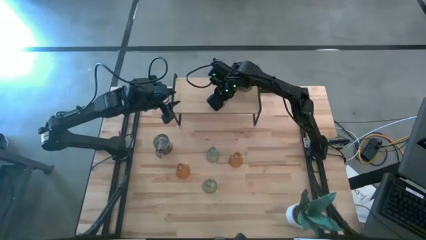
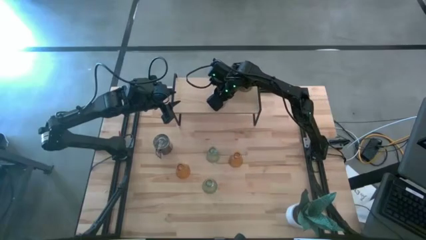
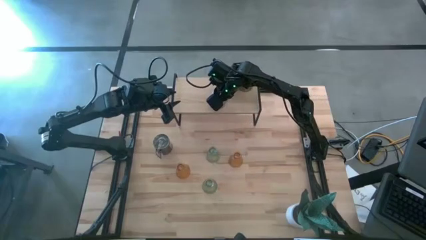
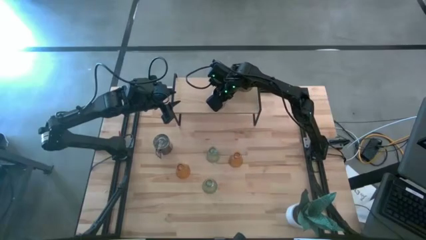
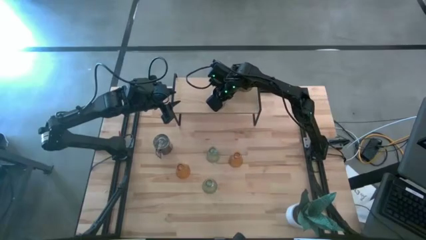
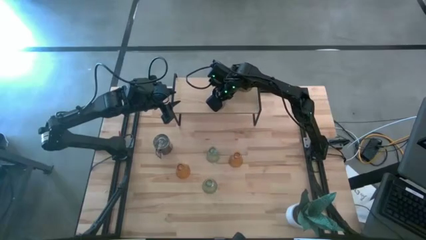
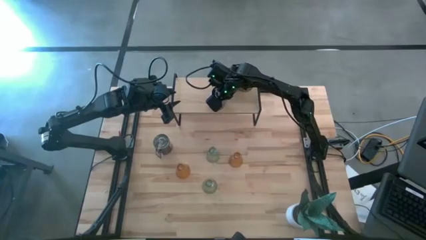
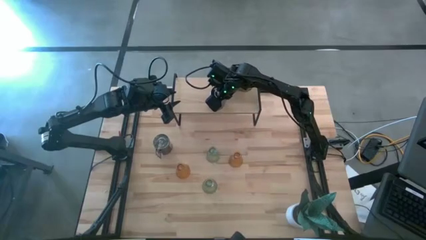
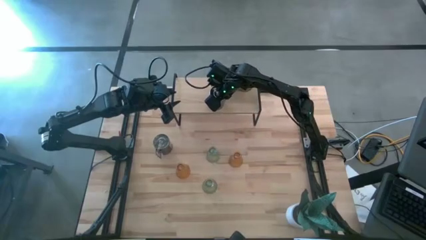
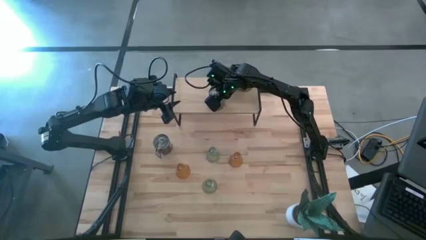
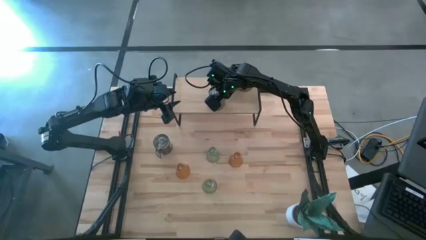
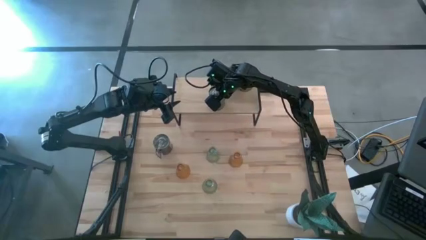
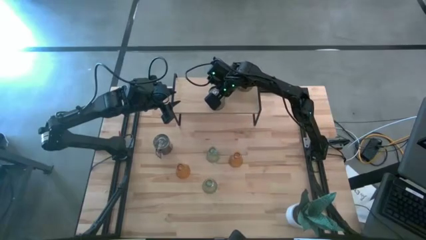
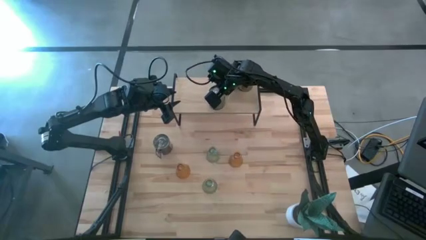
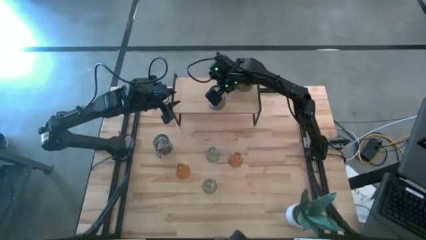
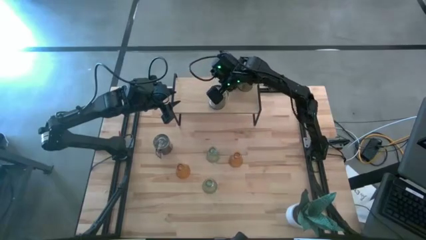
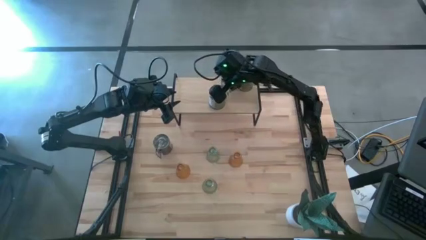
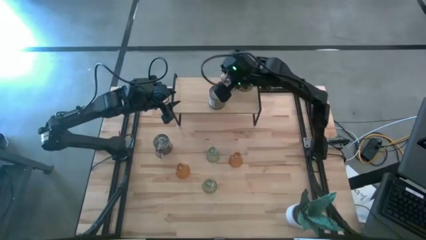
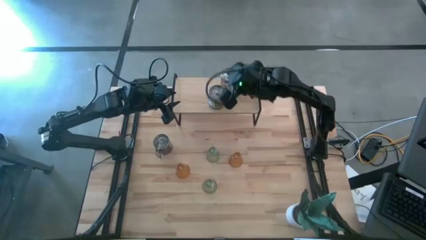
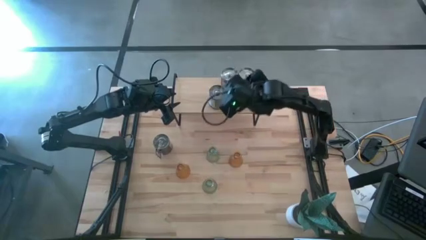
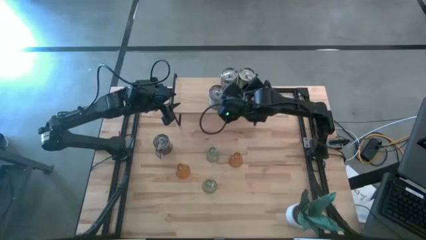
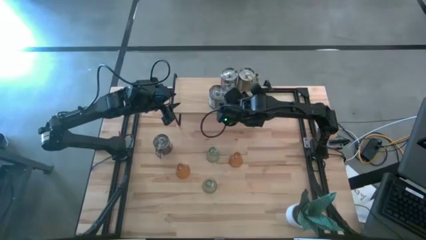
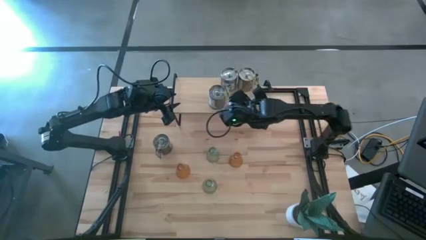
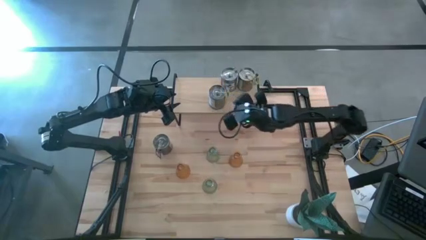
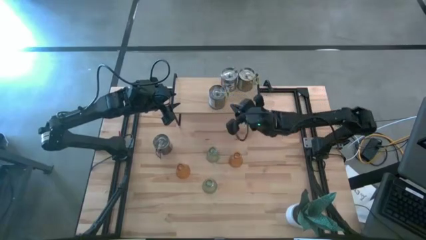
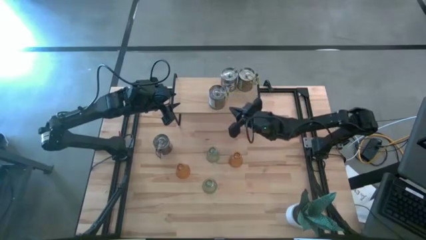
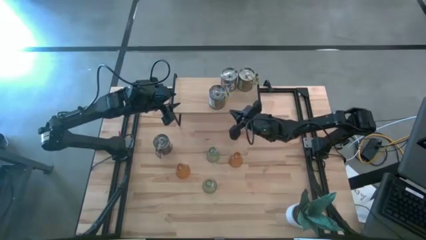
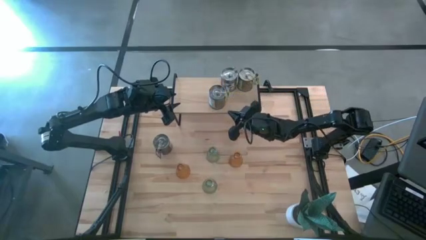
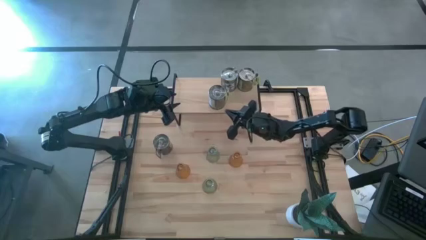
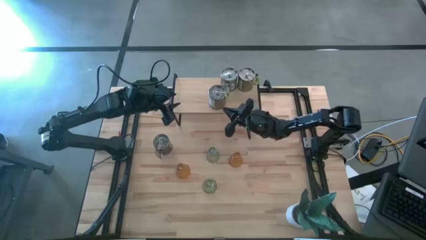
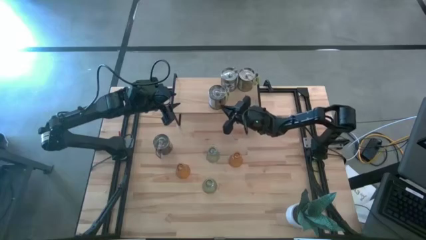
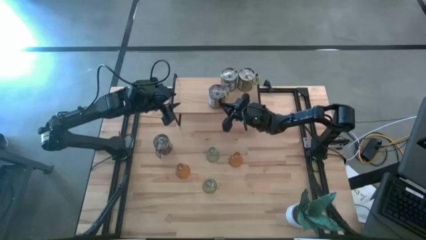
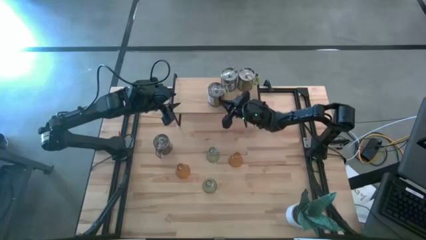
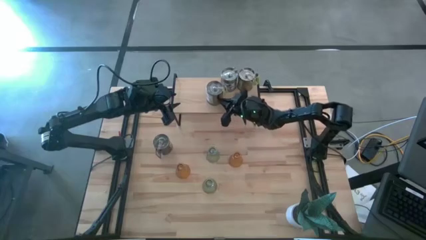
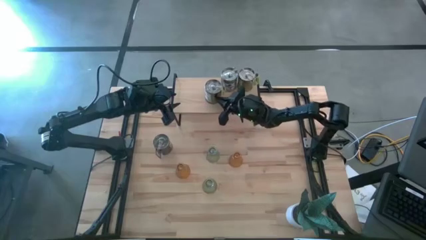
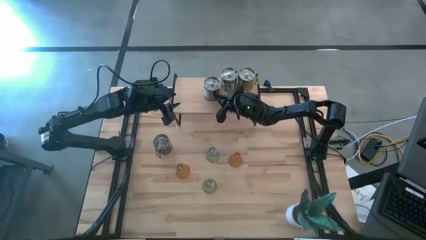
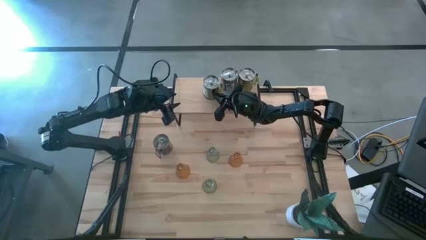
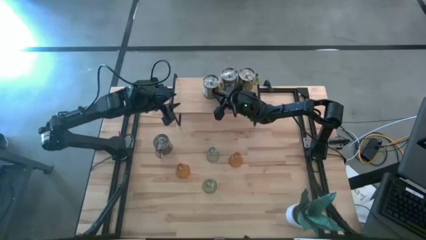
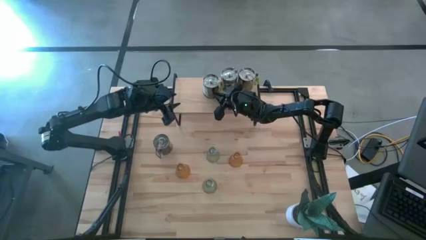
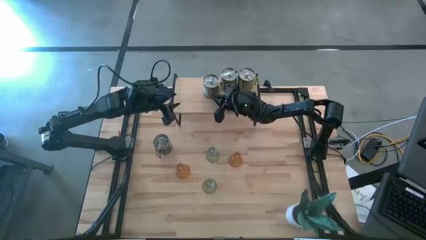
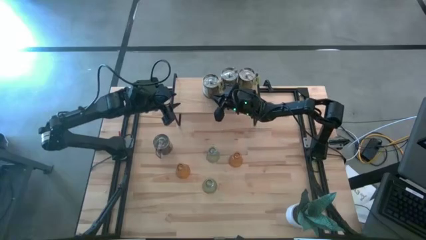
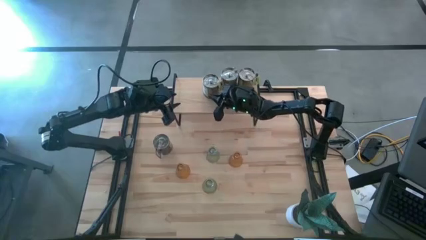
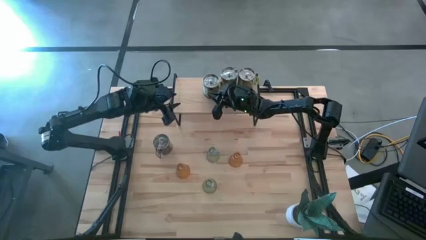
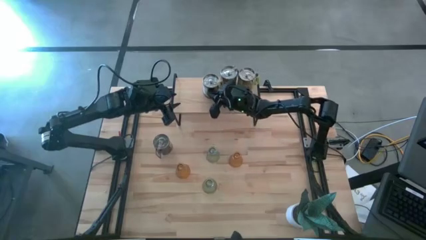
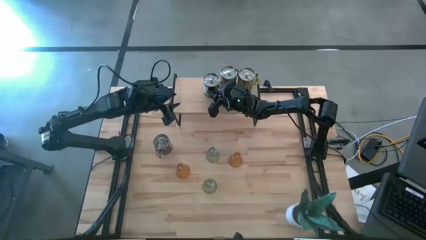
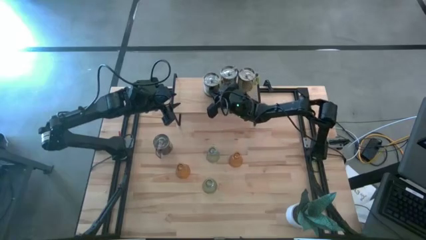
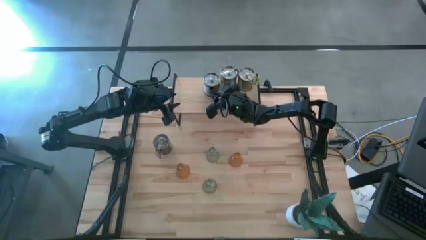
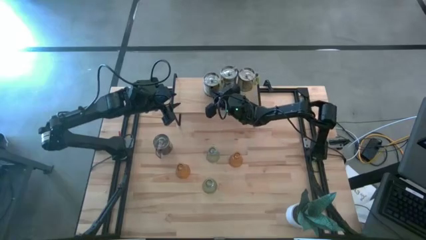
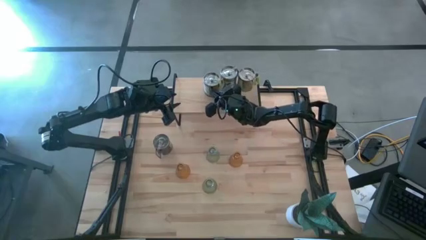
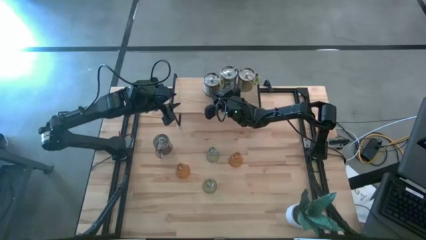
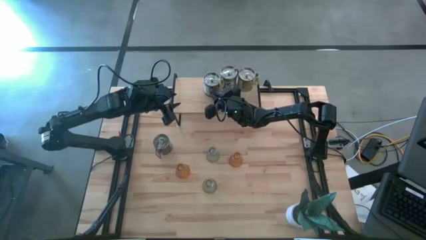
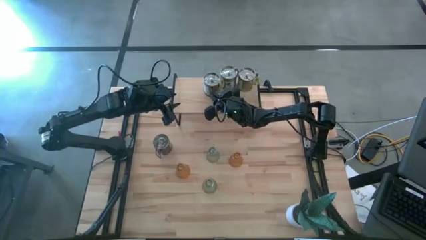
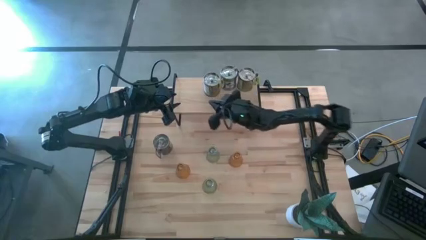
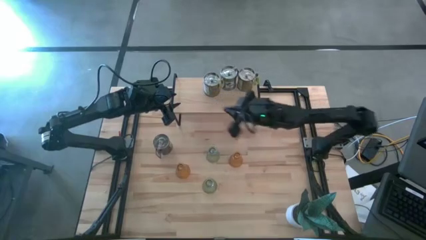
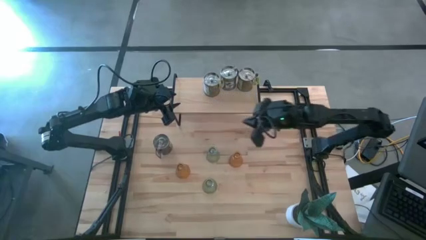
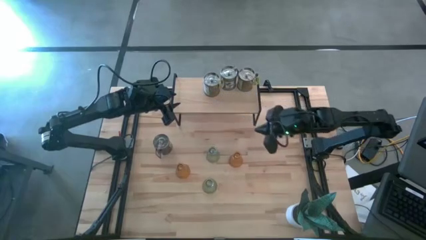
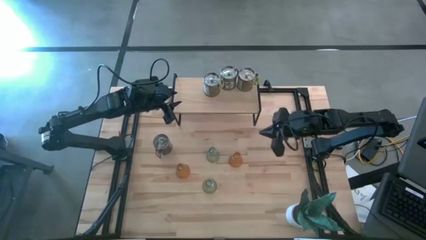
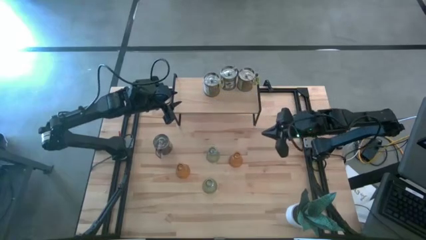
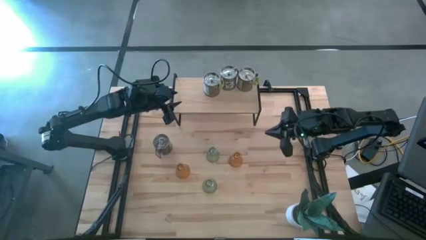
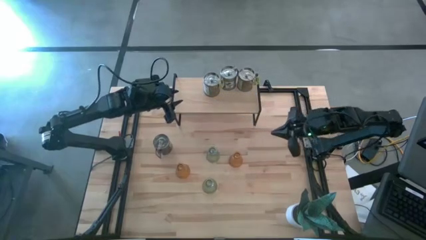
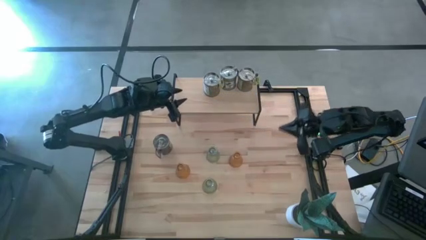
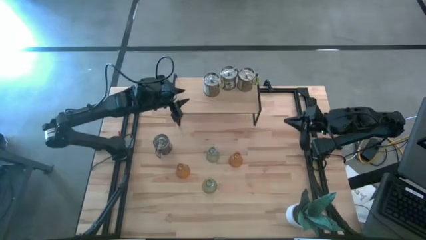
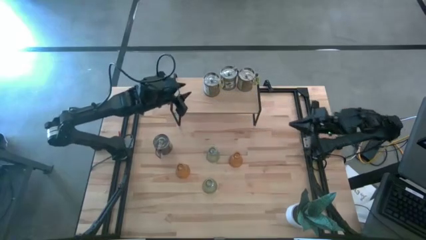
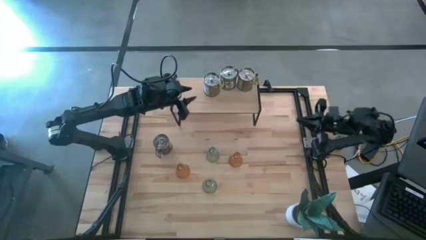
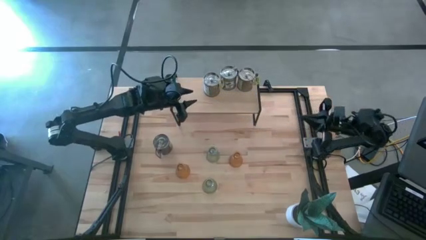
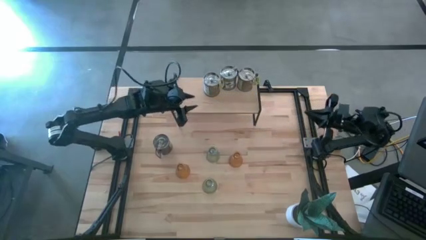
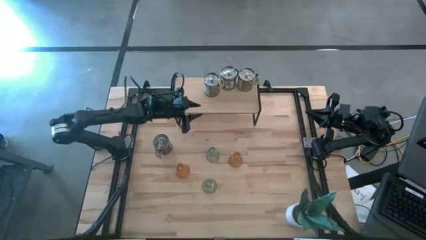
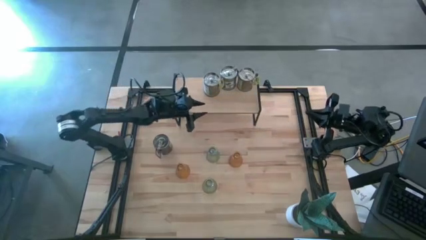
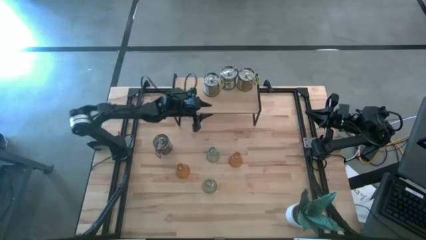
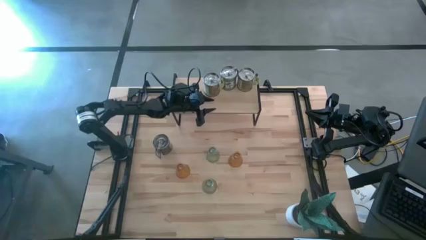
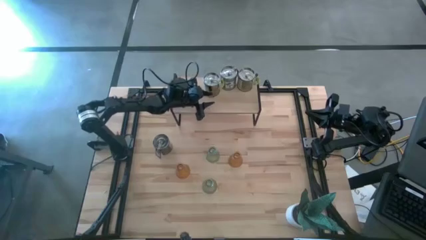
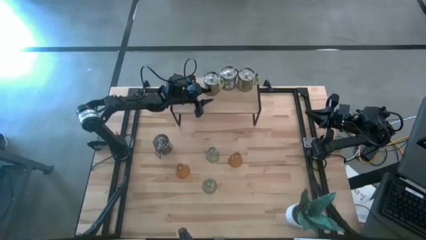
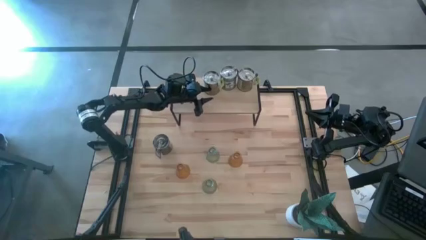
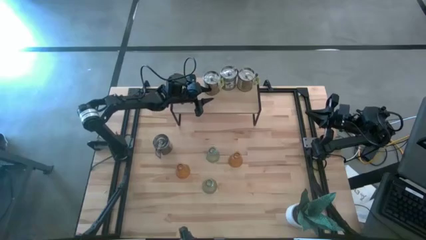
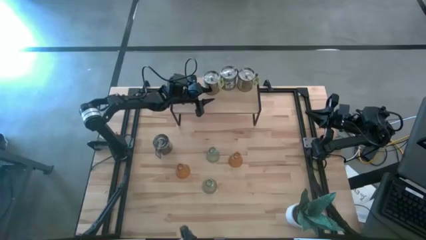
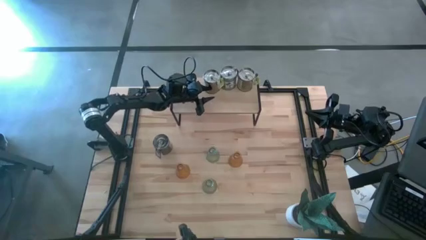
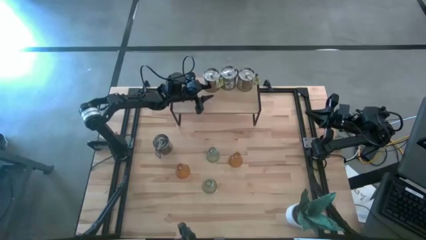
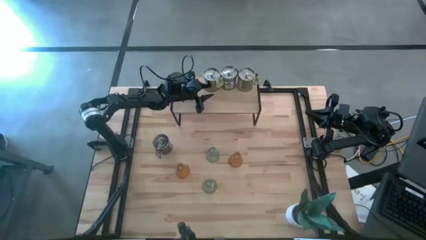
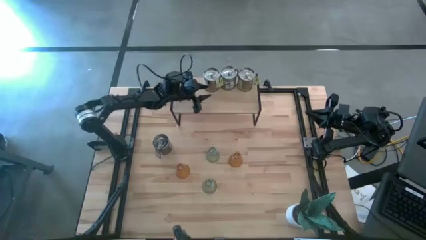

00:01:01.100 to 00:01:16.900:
Task: Pick & Place candle stick holders
Put the silver scented candle on the shelf
